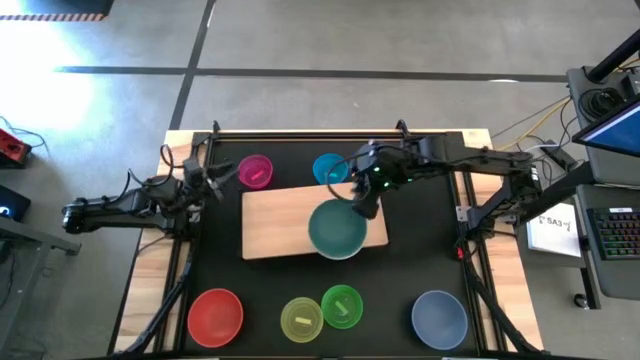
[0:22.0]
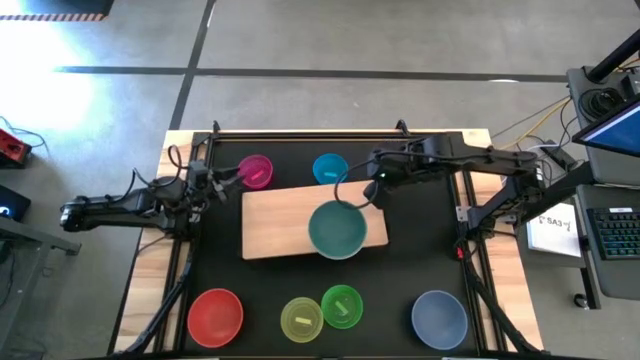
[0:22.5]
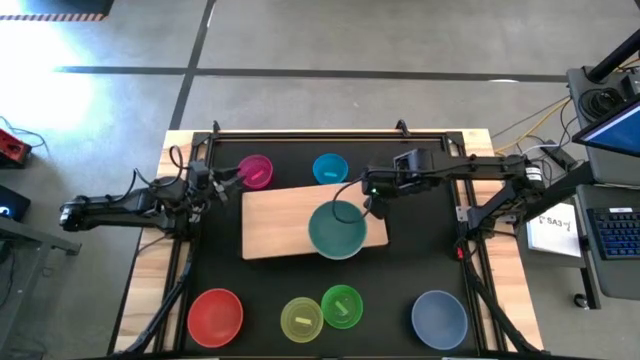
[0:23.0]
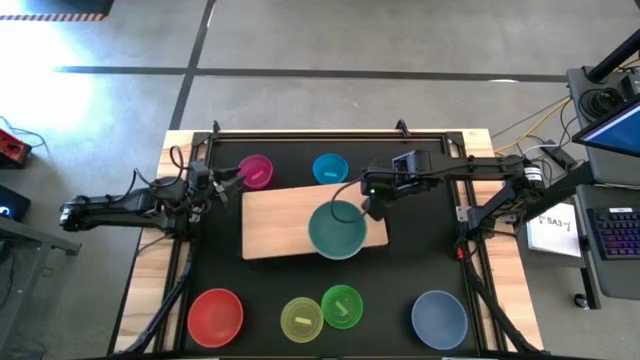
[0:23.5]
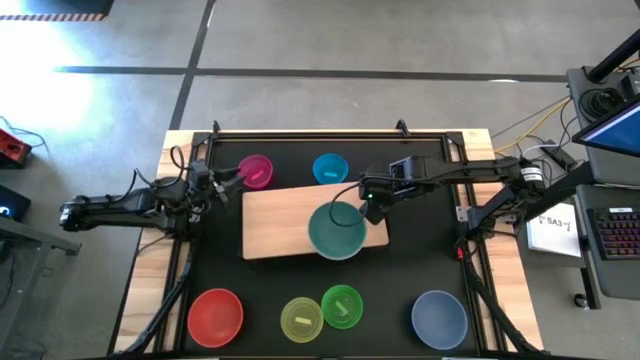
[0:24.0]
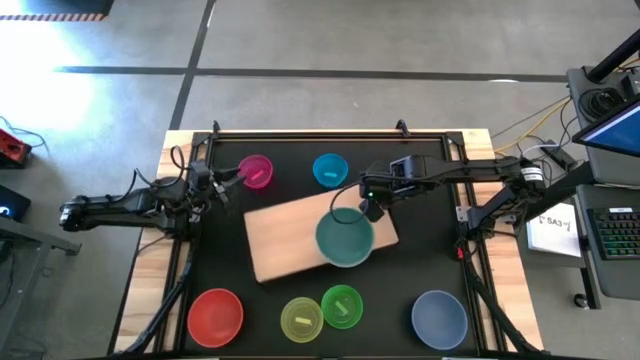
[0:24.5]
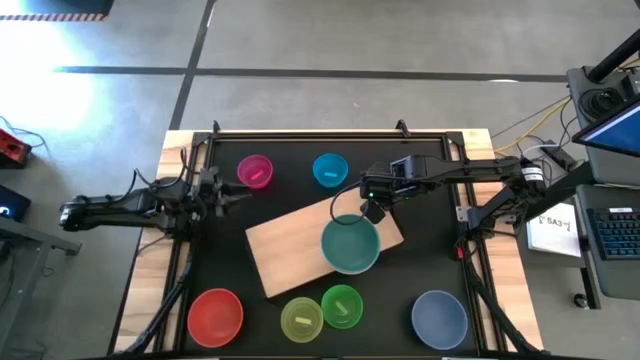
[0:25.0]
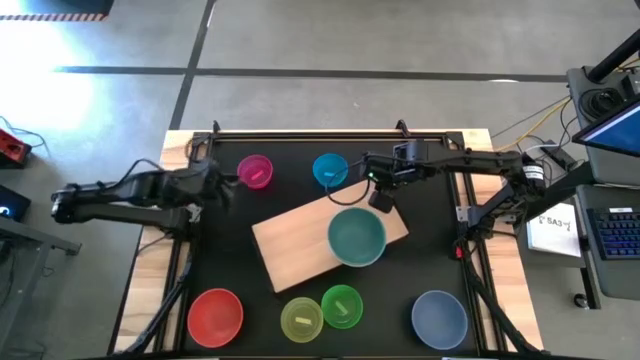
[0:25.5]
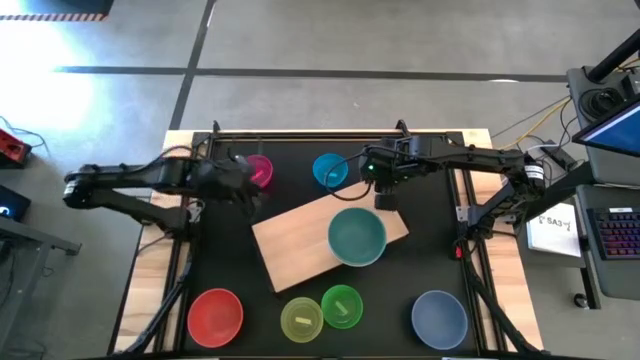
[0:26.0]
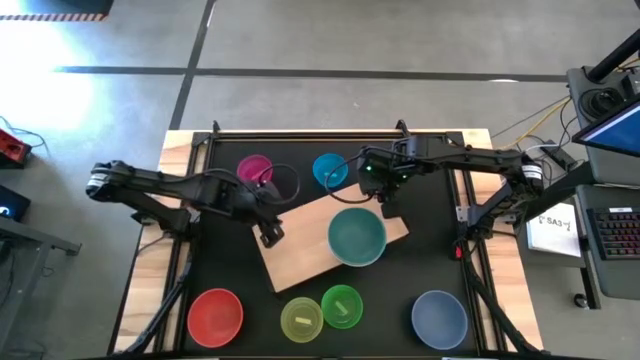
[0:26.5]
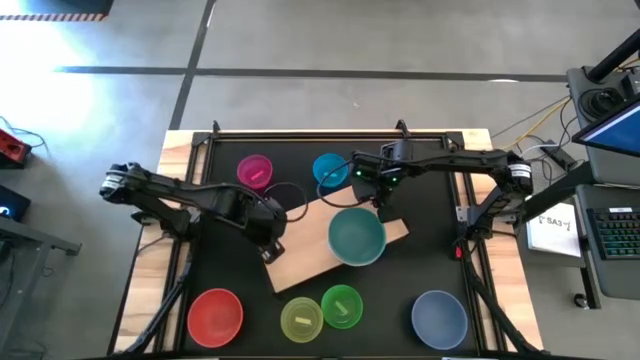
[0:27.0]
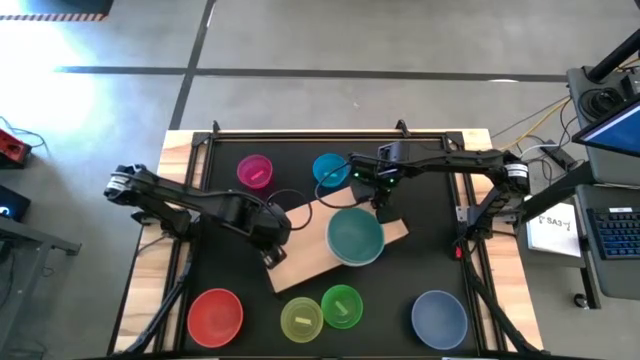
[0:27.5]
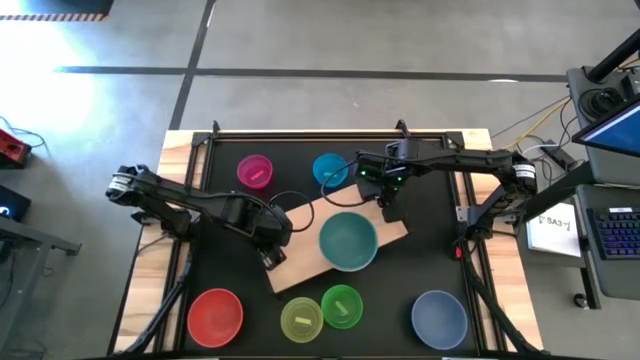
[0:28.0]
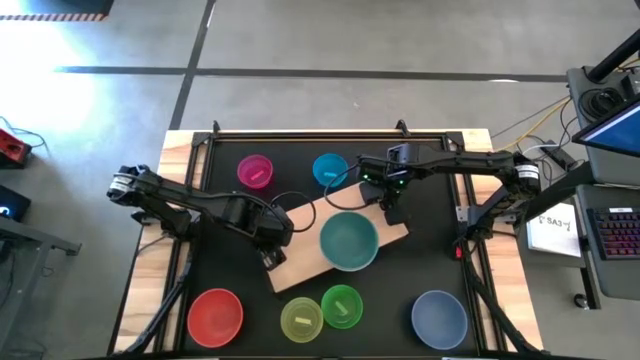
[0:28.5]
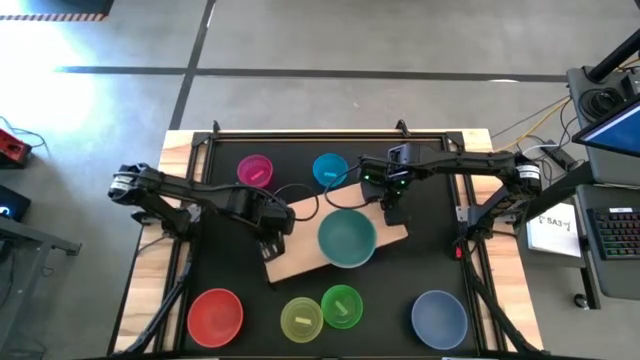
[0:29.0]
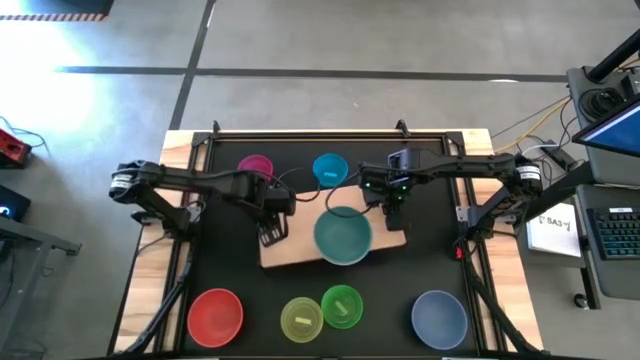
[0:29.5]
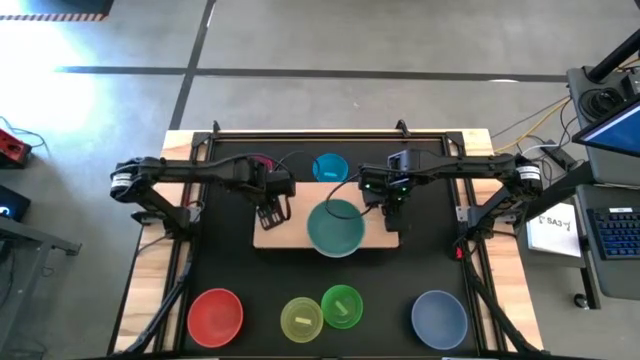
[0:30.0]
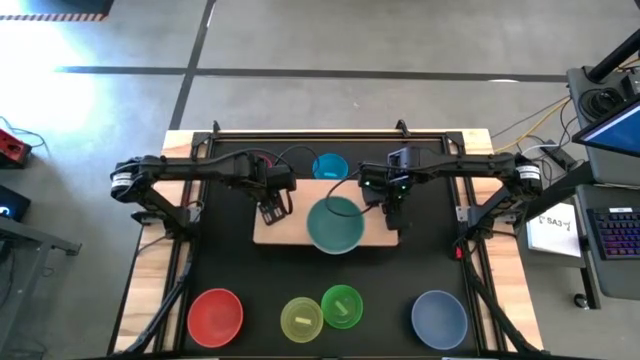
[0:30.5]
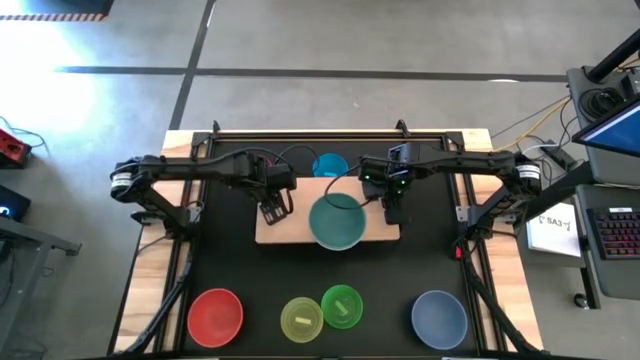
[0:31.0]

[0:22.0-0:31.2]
Task: Place and stack bowls onto a shelf
Adjust the shelf

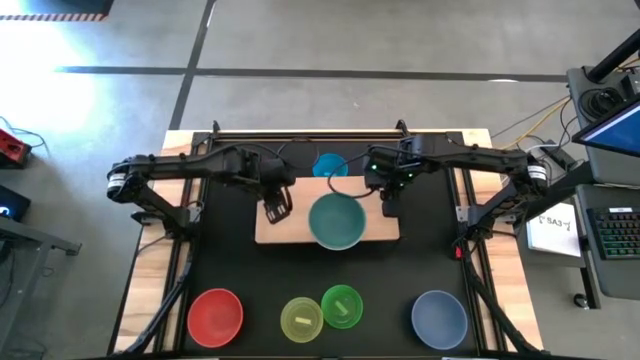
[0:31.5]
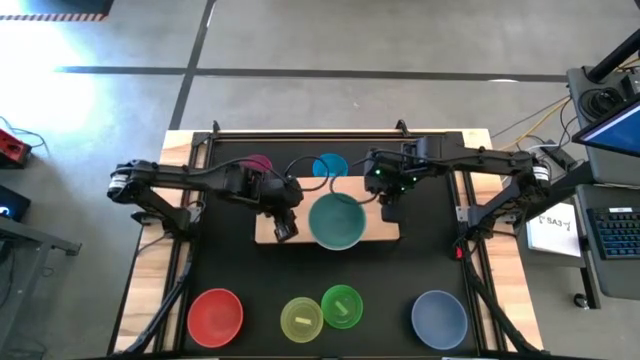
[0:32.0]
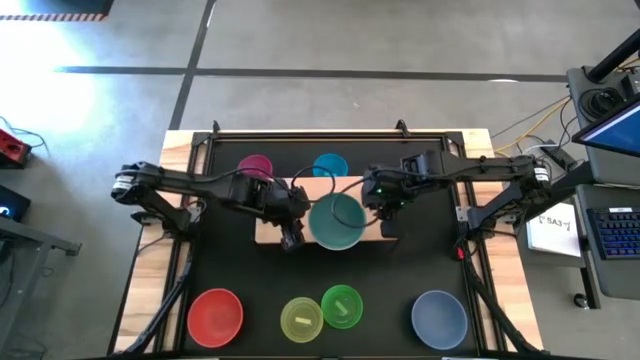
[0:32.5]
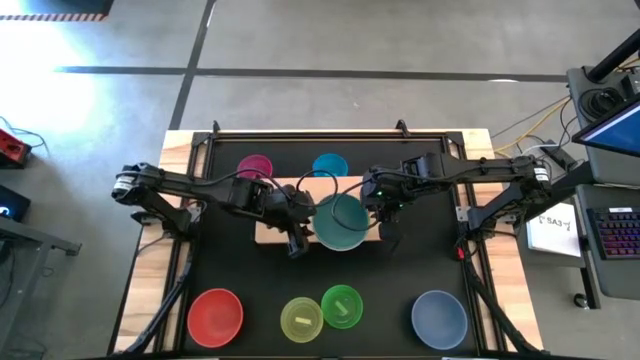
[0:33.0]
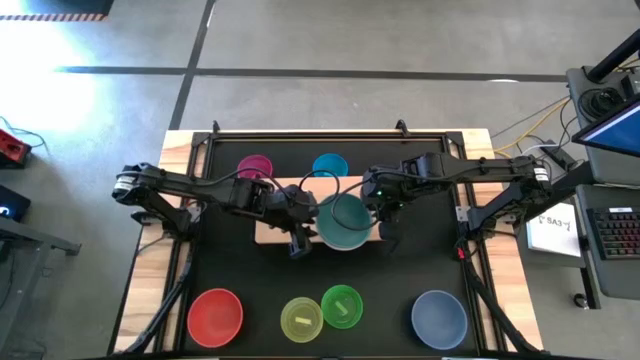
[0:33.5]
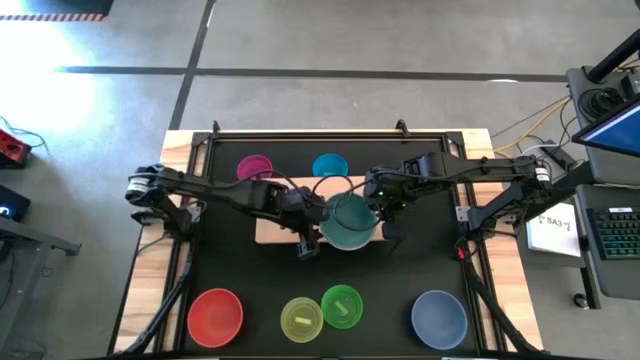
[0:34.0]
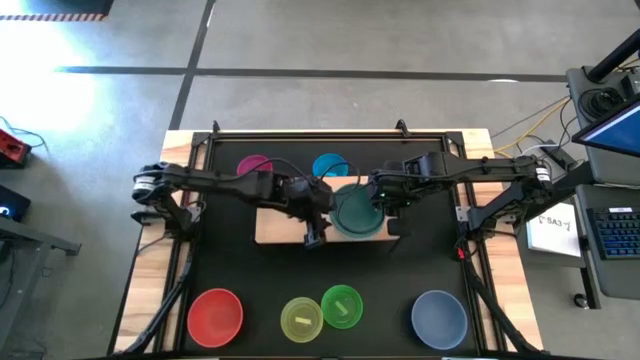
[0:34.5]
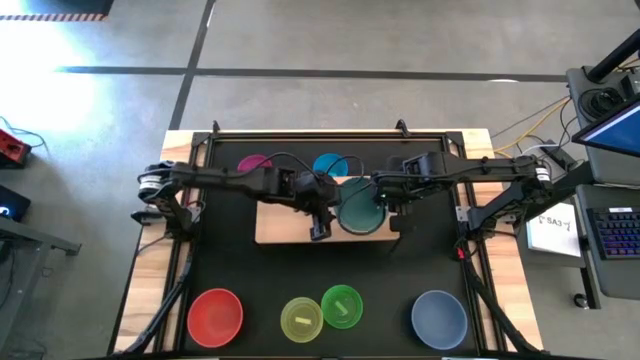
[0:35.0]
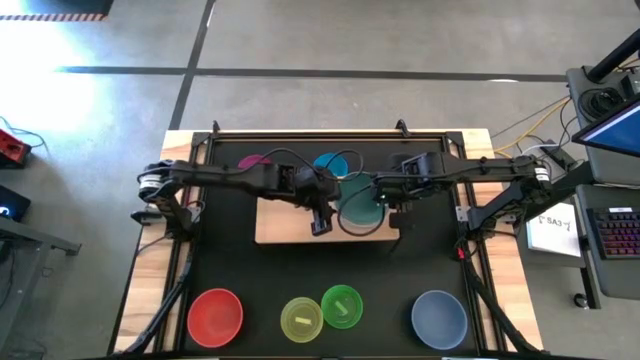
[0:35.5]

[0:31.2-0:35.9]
Adjust the large bowls on the shelf

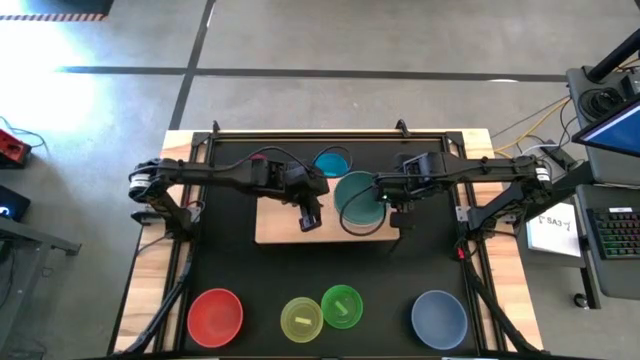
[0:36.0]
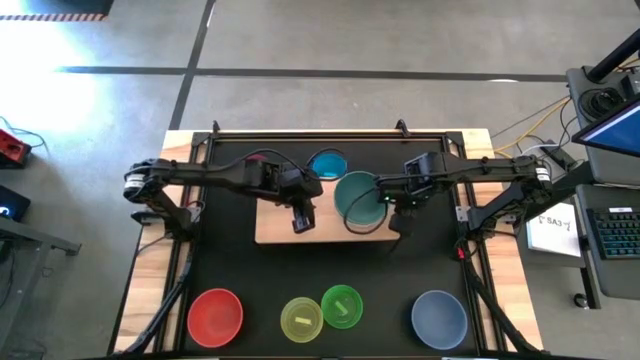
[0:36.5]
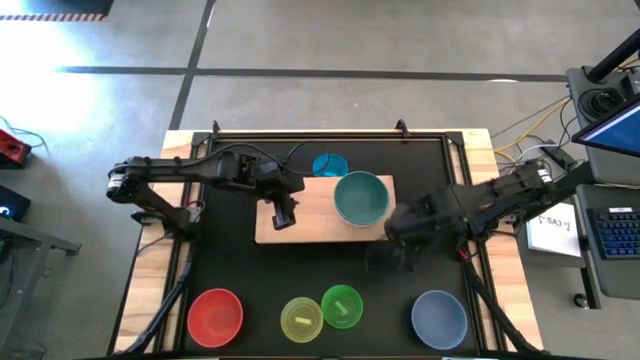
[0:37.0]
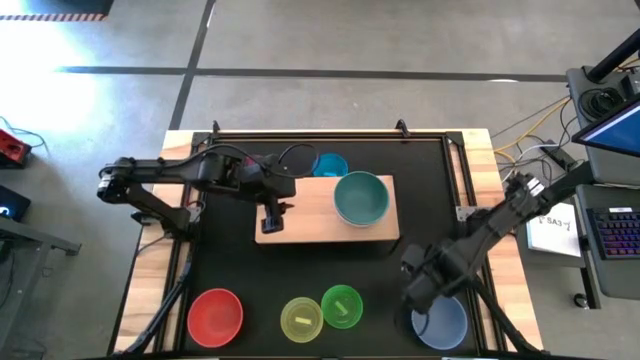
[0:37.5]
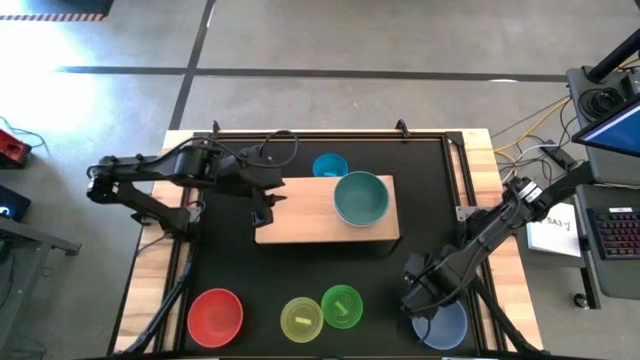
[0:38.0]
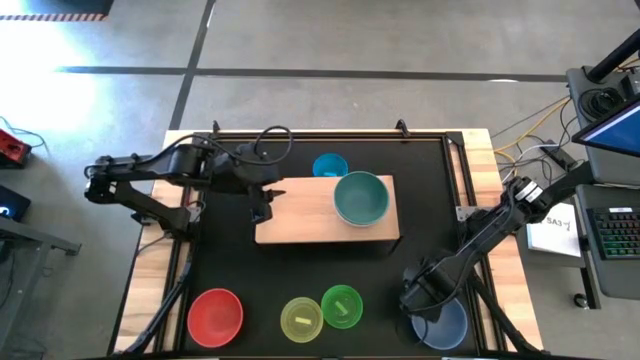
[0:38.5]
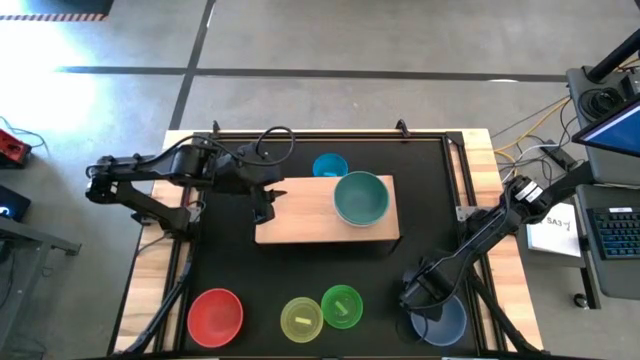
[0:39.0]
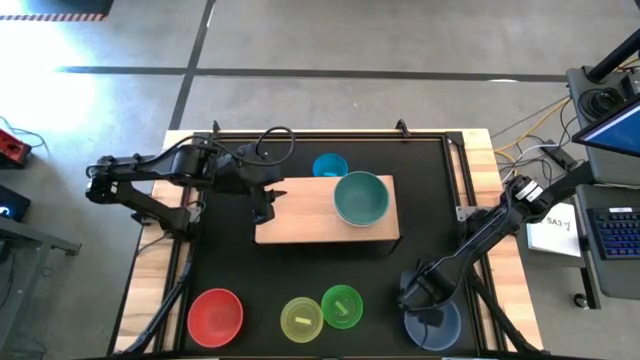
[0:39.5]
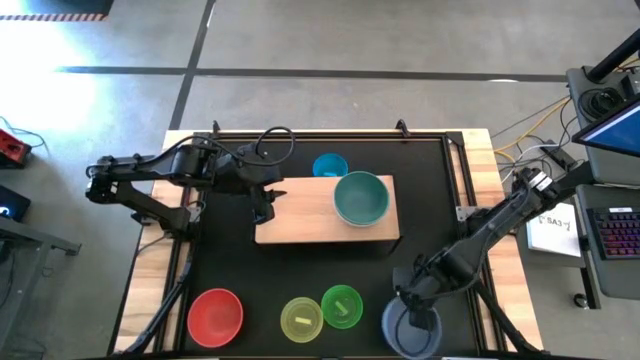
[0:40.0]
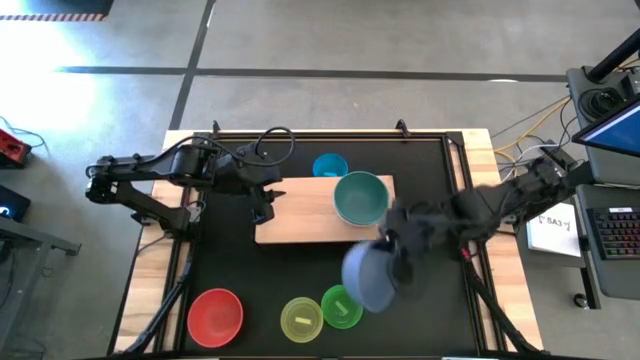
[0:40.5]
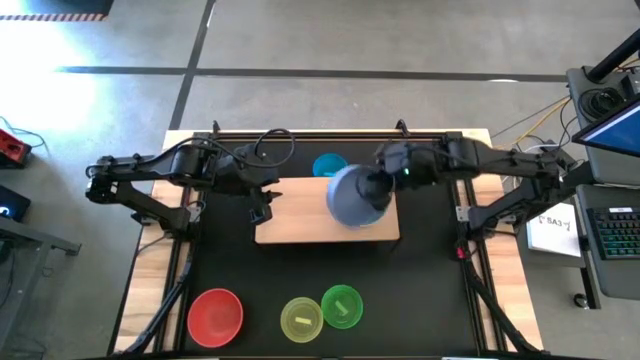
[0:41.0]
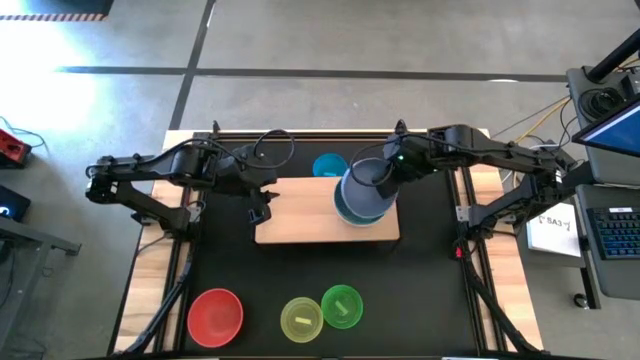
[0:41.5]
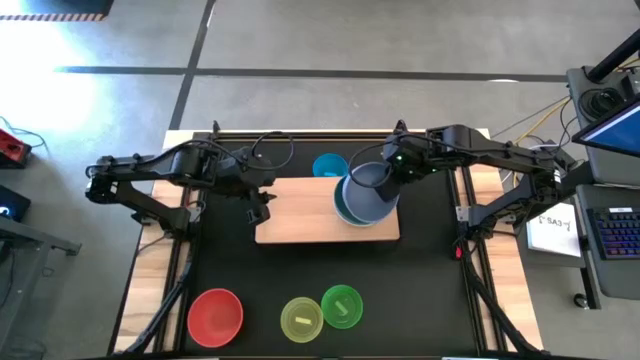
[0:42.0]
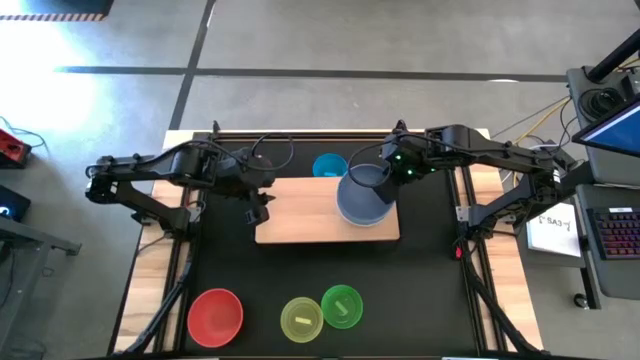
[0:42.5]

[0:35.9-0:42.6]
Stack the large blue bowl on top of the large green bowl on the shelf

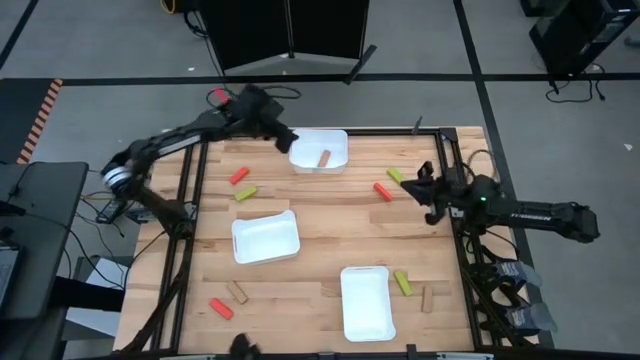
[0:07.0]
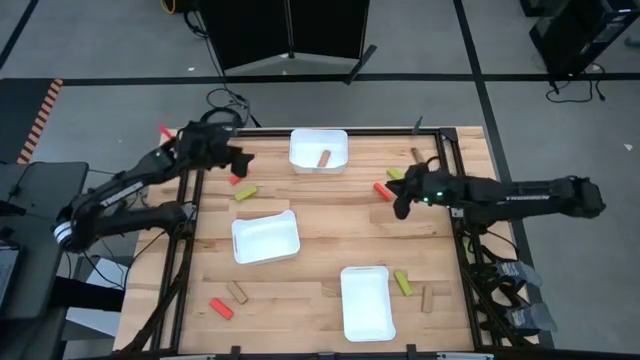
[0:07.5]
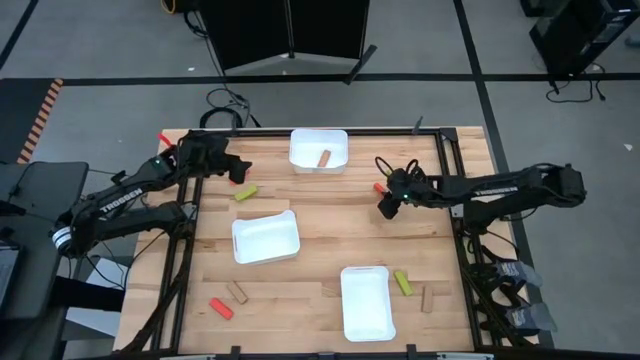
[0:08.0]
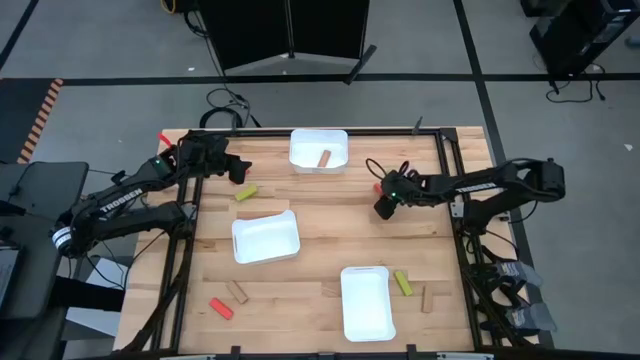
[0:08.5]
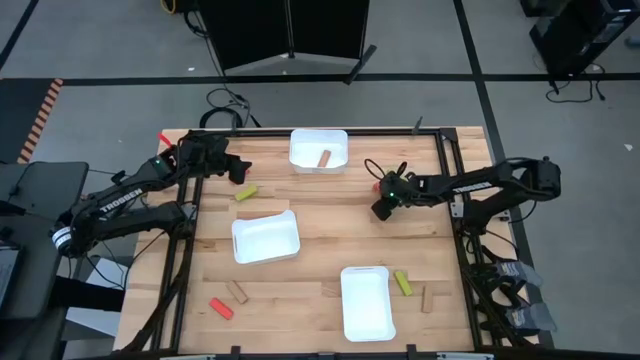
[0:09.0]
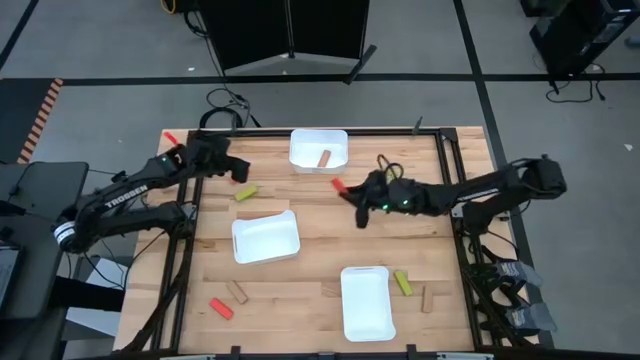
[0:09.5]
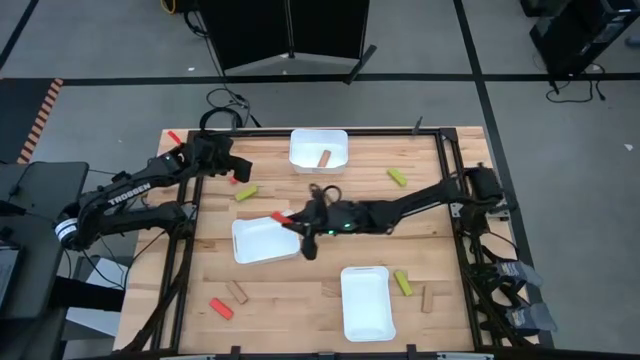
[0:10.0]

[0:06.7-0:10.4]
Task: Sort blocks
Put the top right orange block into the middle white bin
